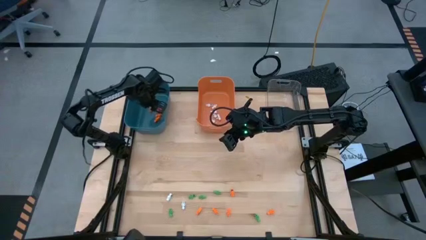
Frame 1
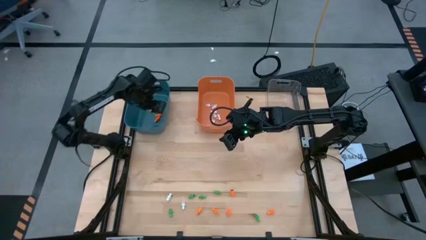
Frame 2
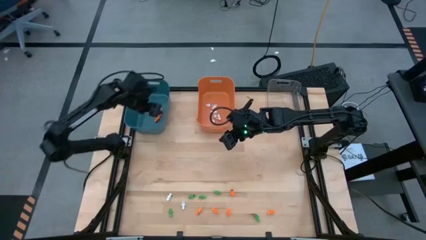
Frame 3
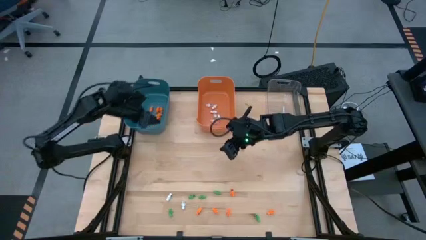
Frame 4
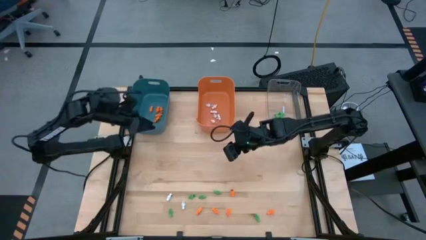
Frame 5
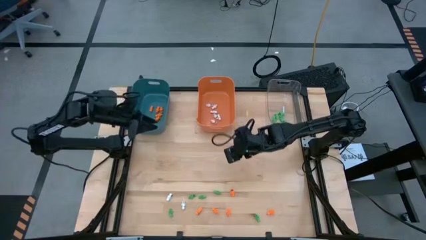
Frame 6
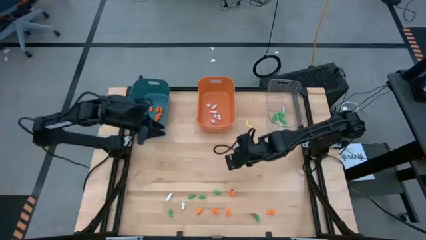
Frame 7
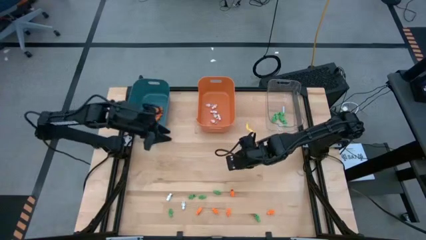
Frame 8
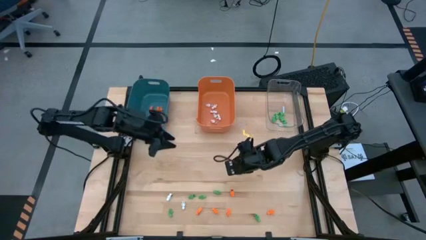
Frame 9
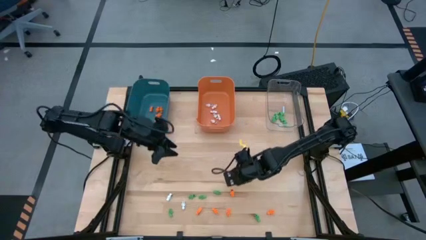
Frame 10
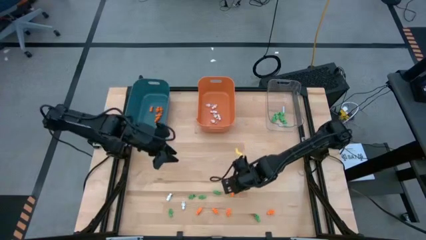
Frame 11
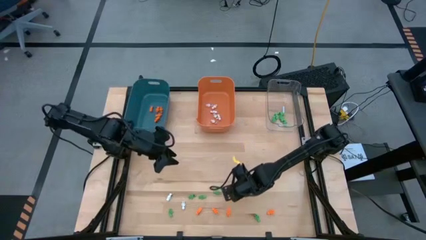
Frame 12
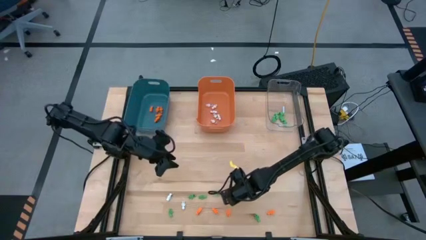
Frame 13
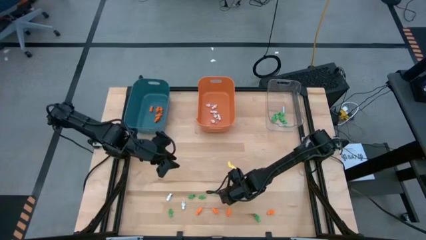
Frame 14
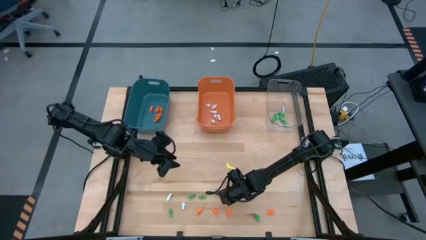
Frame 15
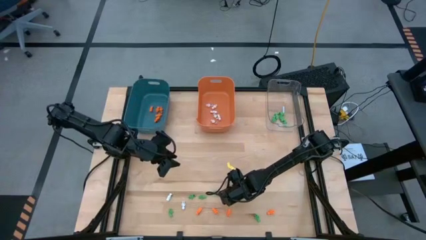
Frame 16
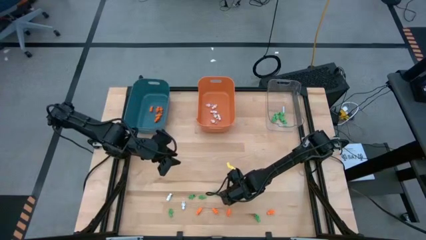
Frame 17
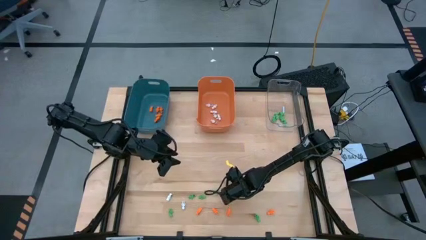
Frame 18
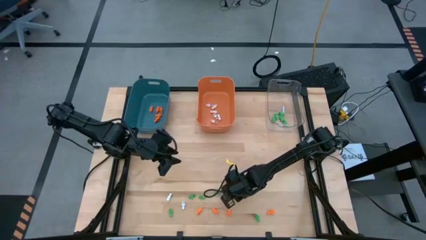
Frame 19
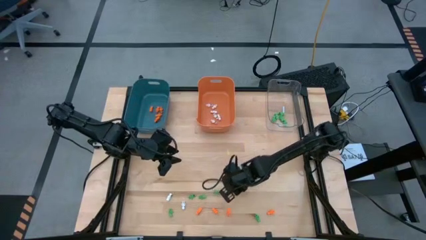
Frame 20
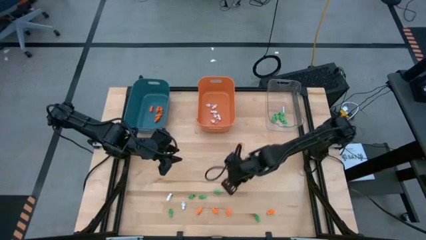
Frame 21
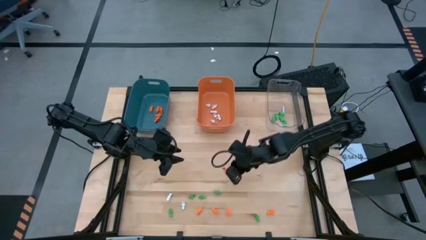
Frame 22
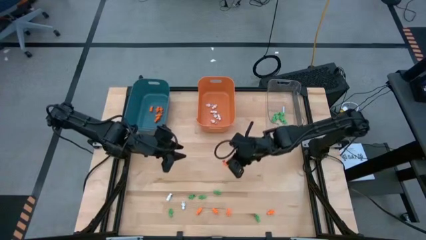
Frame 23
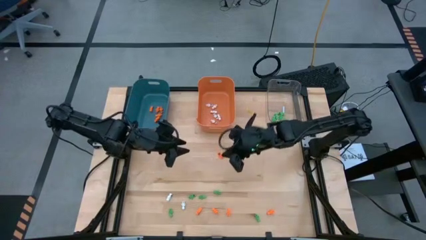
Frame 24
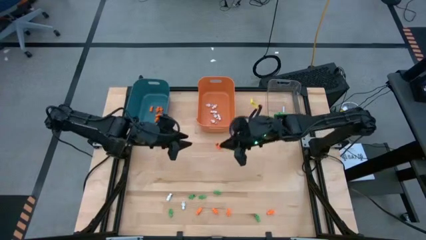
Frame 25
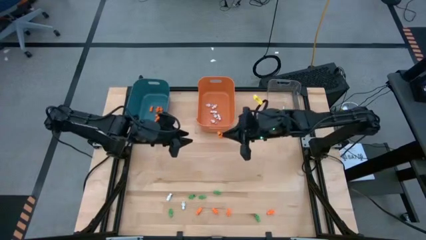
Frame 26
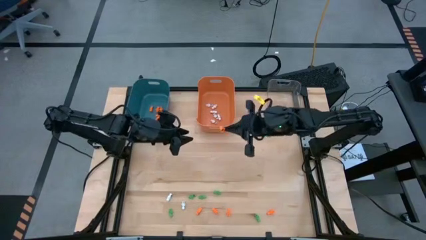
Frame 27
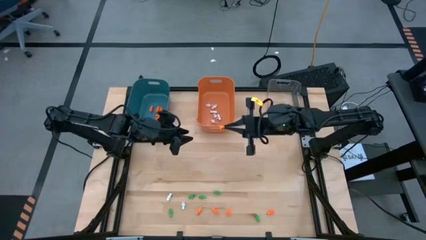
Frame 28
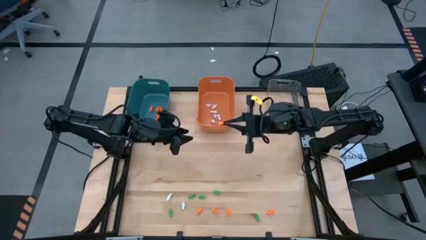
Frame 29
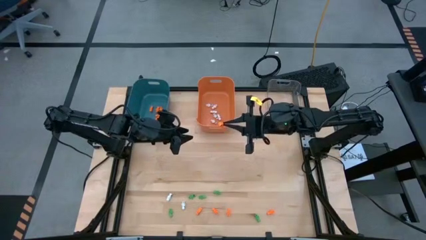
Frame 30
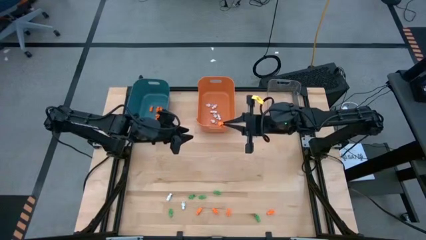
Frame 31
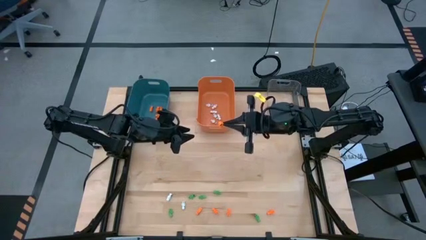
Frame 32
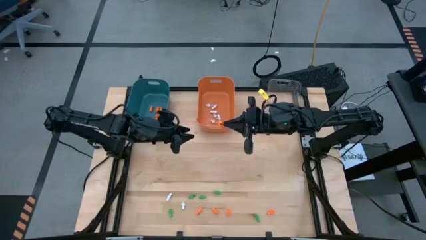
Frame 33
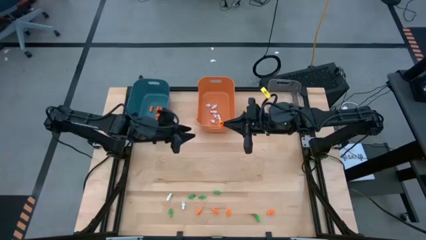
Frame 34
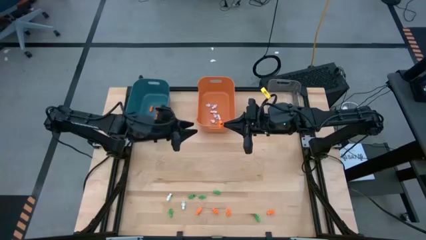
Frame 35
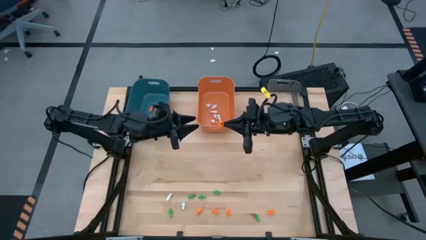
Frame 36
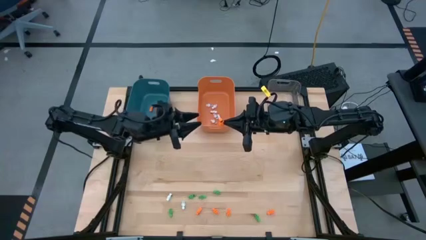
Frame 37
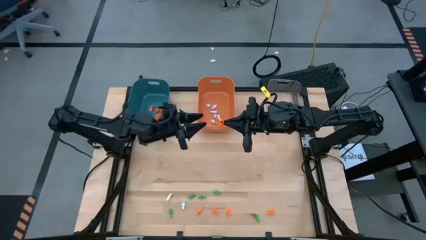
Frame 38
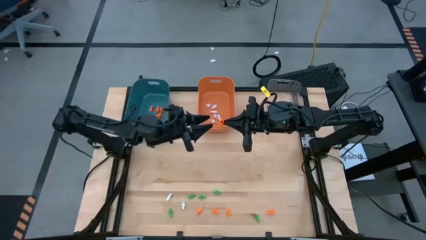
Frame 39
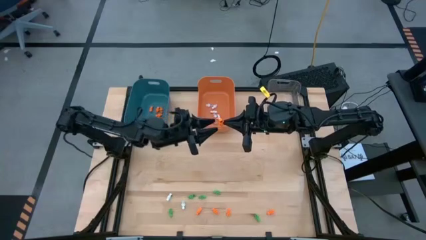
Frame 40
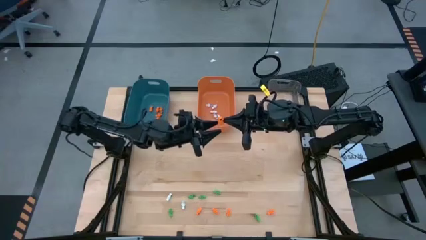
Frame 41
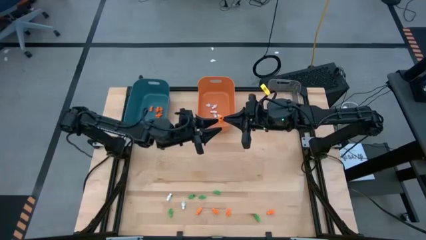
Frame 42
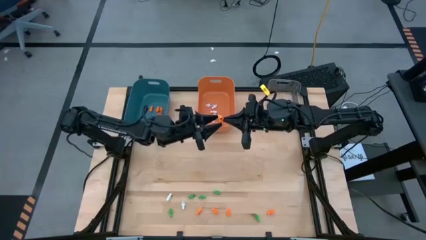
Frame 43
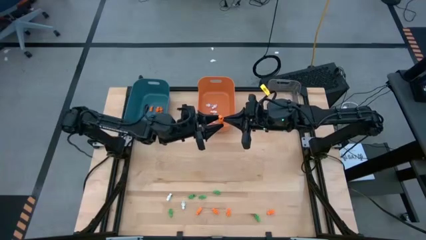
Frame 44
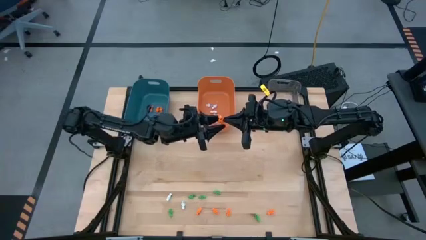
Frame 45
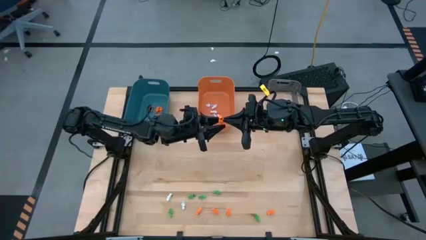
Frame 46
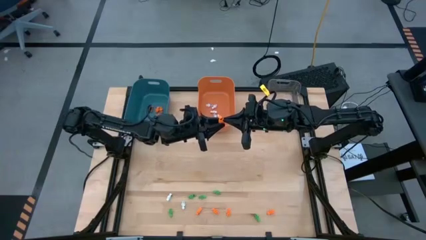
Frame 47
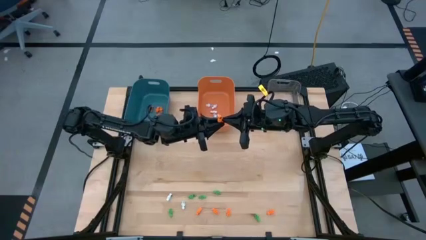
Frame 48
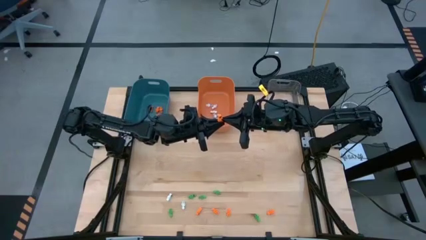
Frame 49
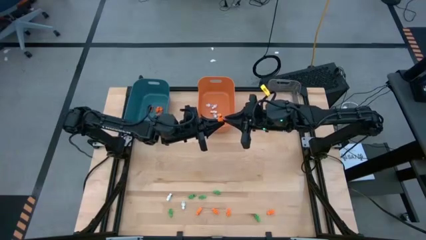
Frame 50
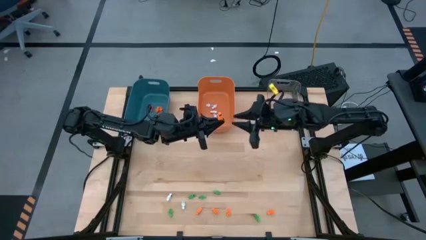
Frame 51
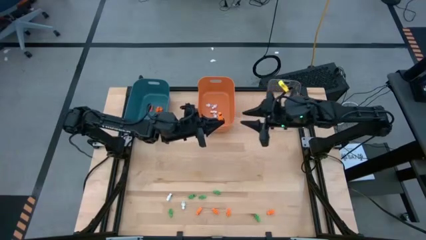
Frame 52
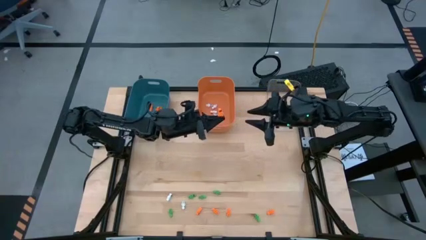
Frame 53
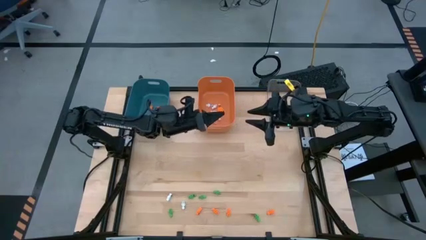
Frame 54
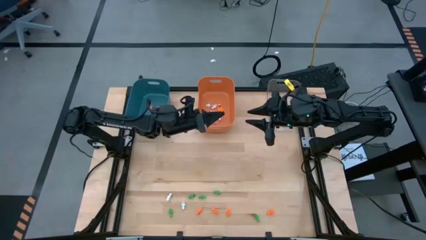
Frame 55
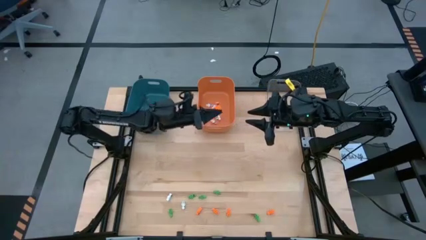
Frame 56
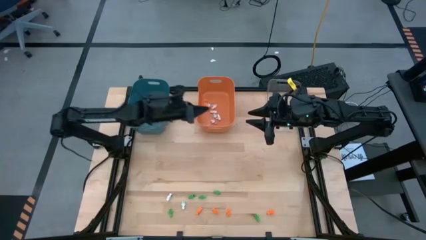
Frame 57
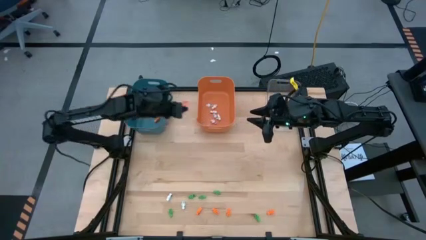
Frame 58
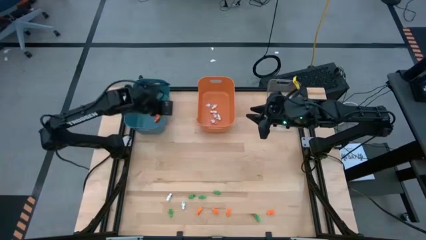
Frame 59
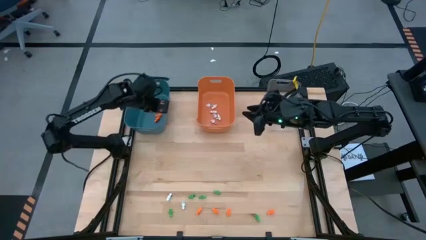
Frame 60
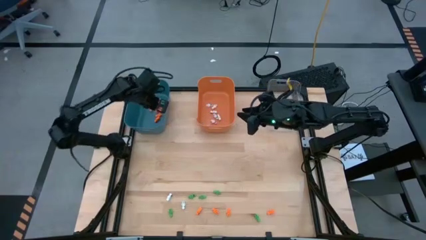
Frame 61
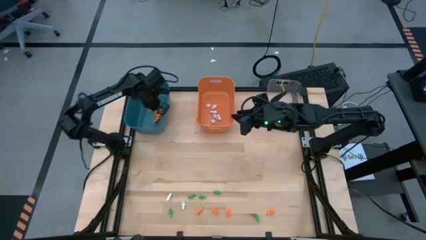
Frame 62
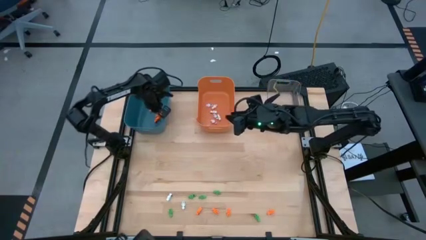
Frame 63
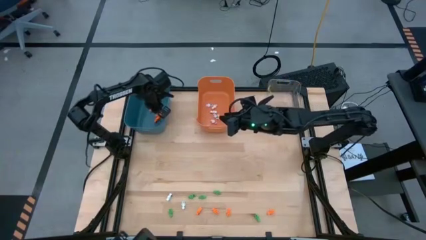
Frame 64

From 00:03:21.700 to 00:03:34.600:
Task: Sort Halloween decoration
Put the orange skeleton toy into the blue bin
